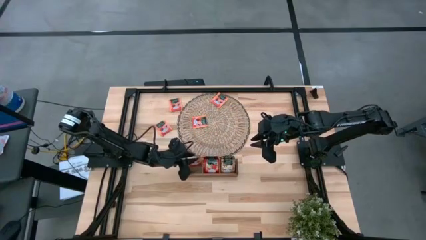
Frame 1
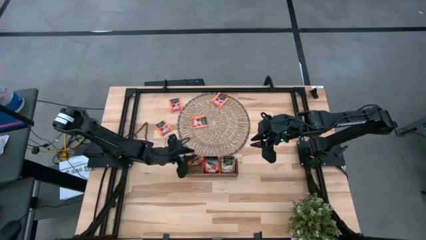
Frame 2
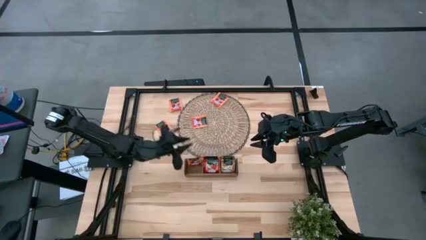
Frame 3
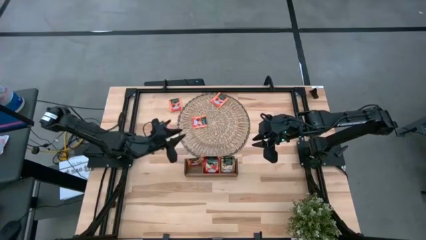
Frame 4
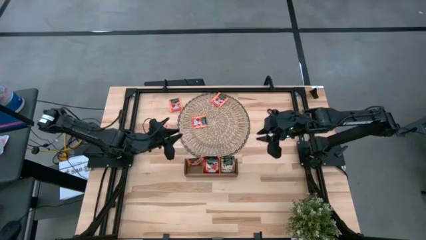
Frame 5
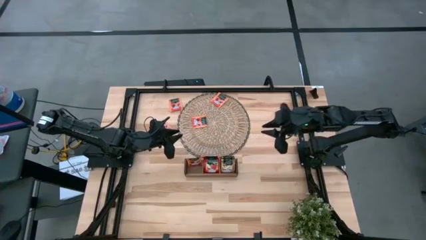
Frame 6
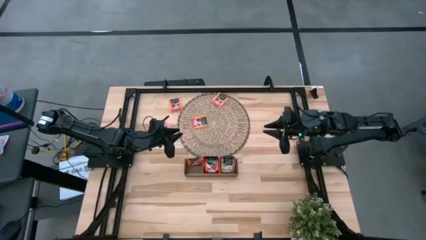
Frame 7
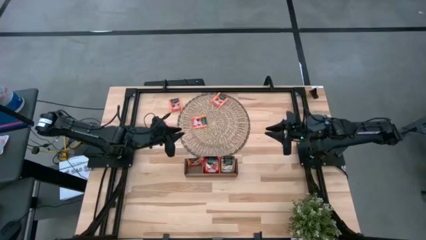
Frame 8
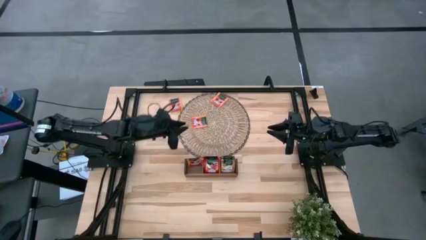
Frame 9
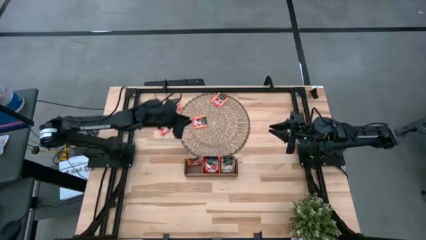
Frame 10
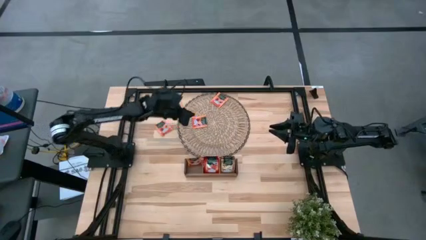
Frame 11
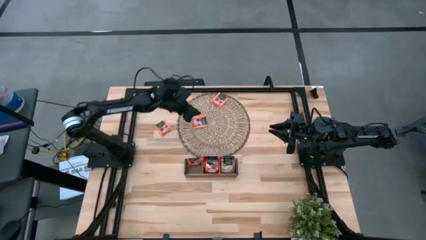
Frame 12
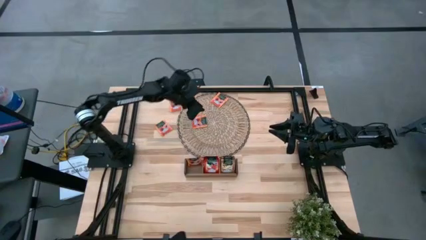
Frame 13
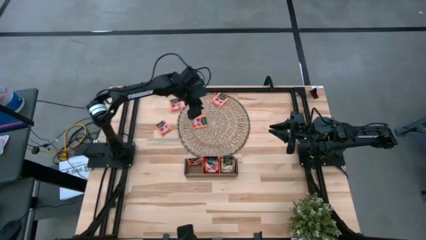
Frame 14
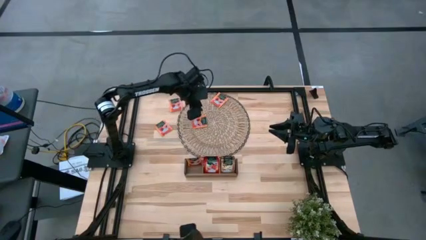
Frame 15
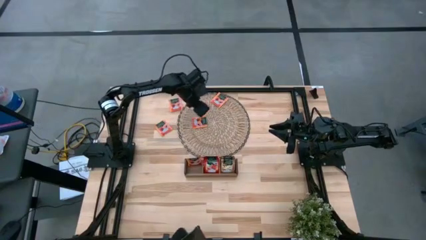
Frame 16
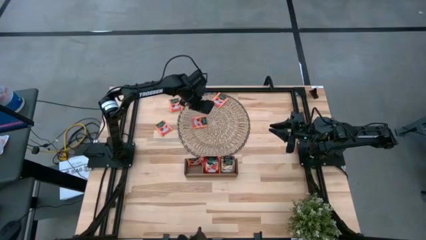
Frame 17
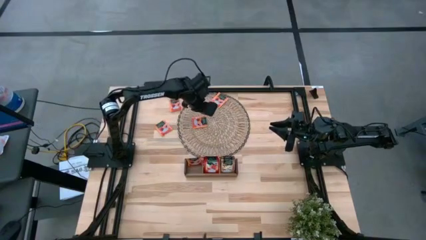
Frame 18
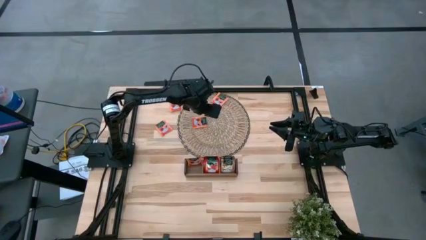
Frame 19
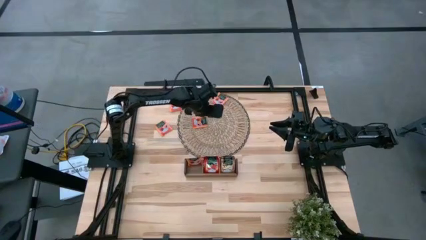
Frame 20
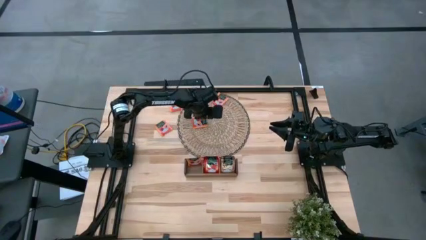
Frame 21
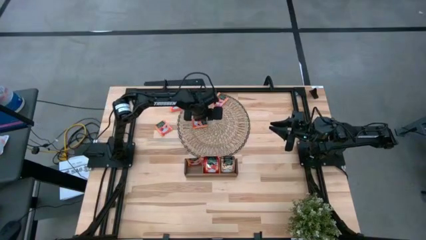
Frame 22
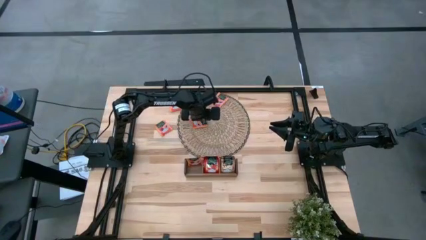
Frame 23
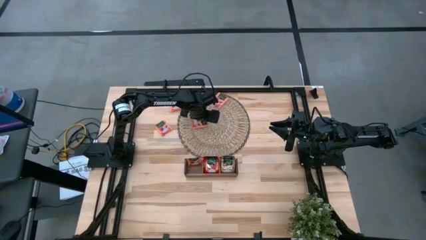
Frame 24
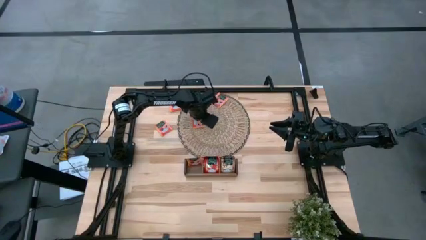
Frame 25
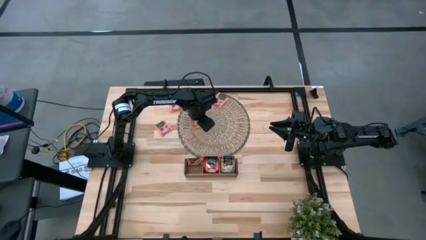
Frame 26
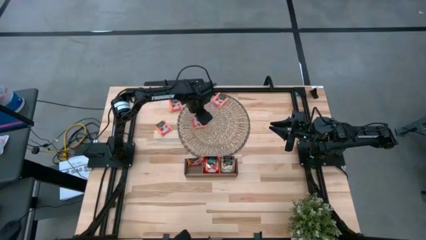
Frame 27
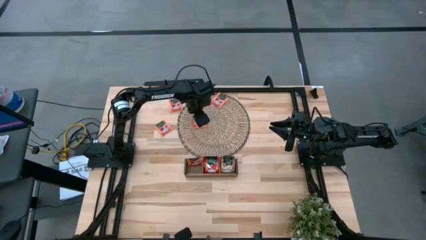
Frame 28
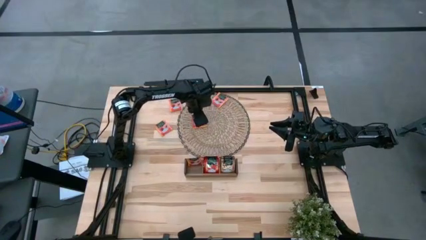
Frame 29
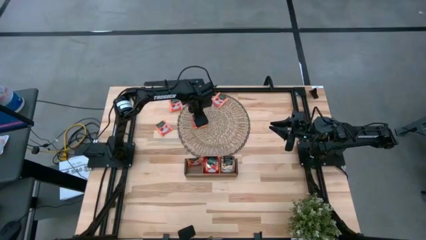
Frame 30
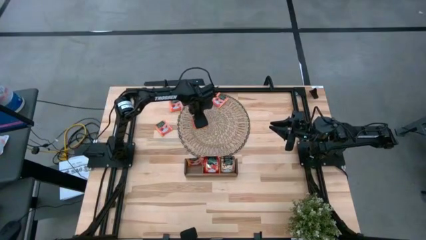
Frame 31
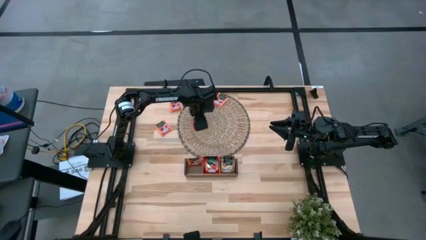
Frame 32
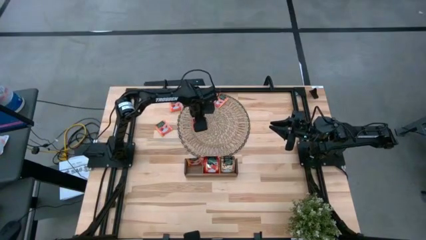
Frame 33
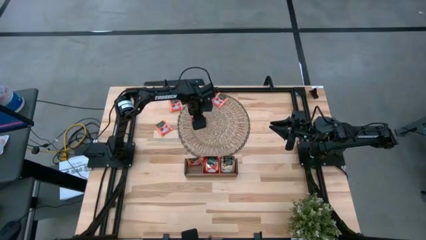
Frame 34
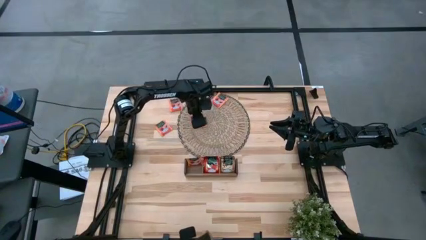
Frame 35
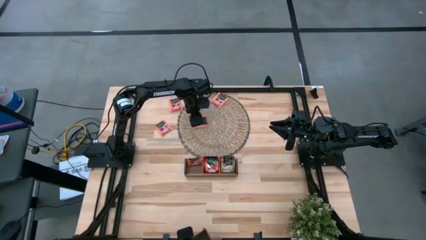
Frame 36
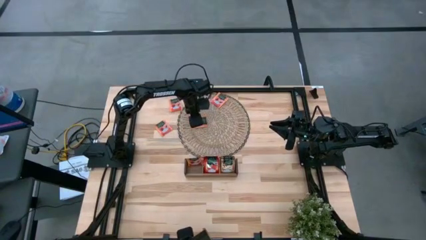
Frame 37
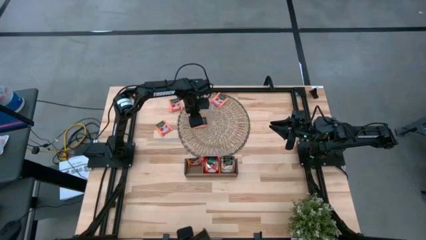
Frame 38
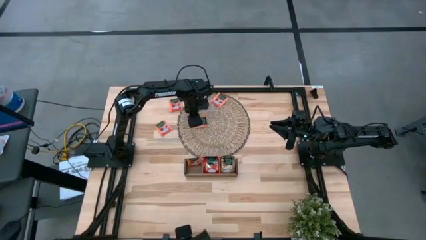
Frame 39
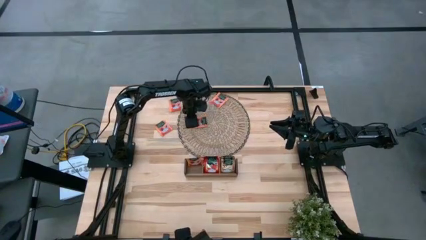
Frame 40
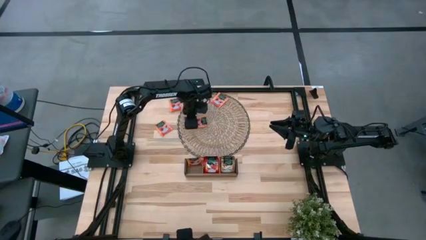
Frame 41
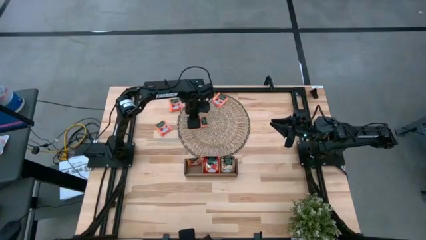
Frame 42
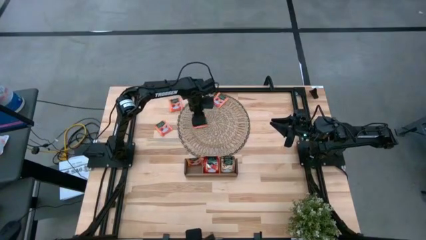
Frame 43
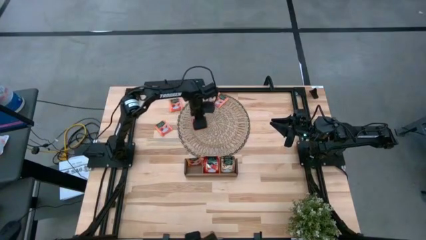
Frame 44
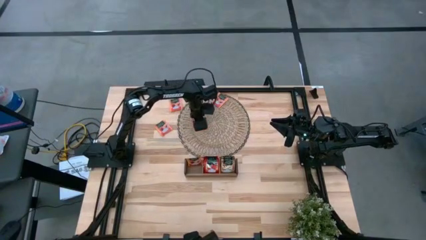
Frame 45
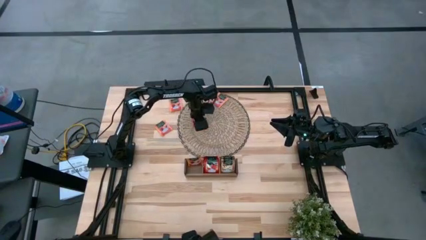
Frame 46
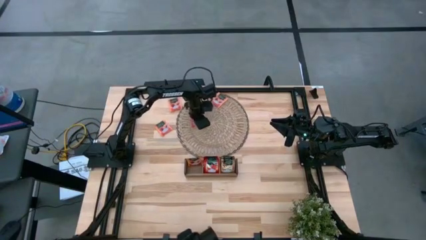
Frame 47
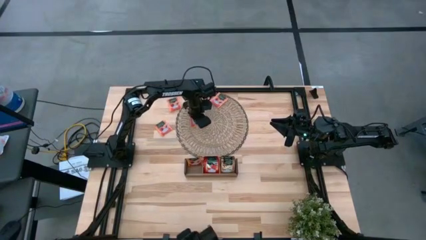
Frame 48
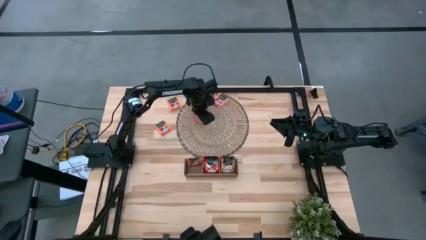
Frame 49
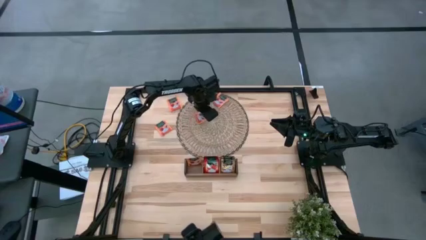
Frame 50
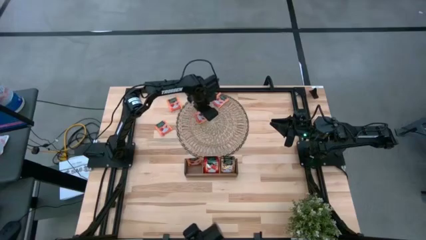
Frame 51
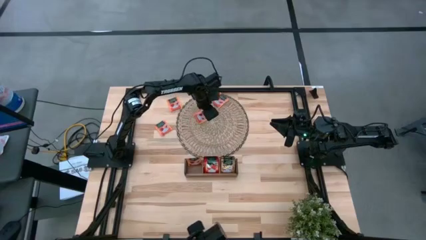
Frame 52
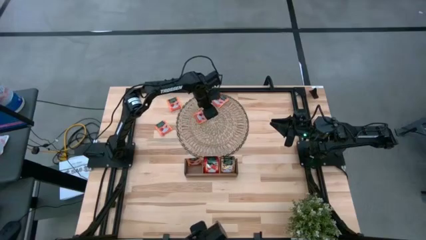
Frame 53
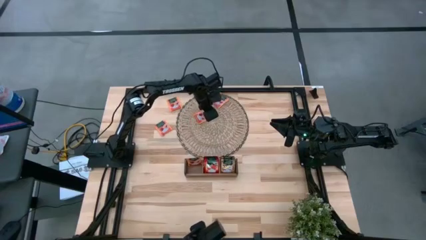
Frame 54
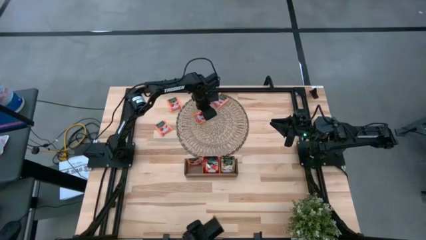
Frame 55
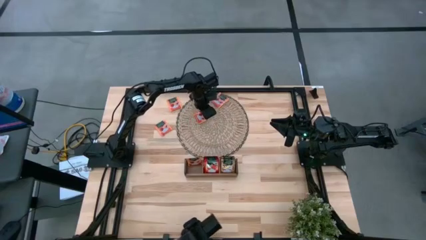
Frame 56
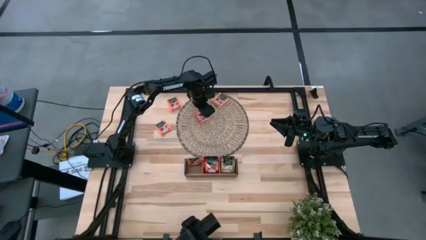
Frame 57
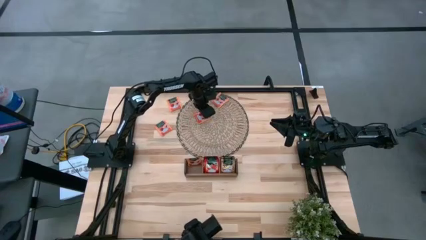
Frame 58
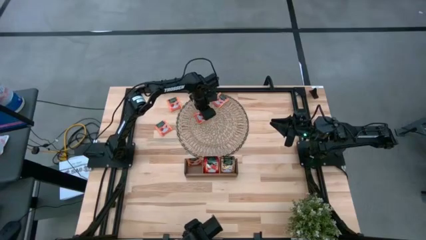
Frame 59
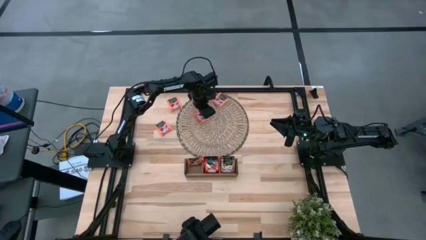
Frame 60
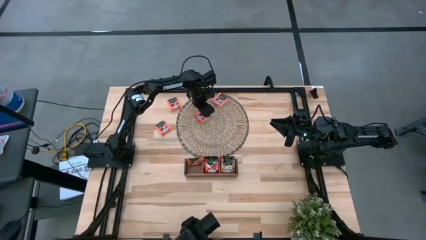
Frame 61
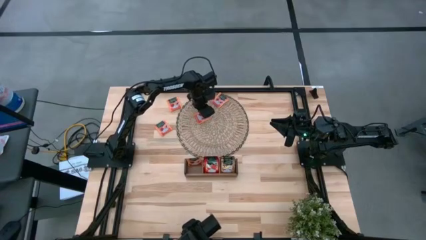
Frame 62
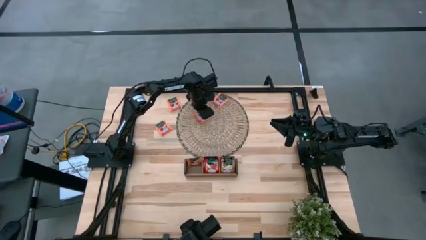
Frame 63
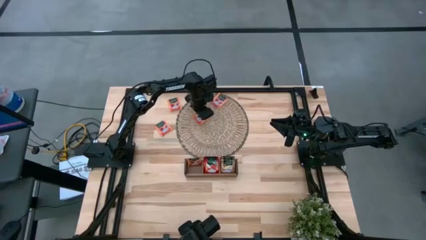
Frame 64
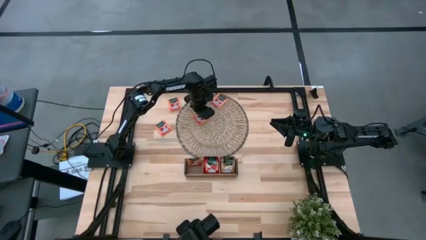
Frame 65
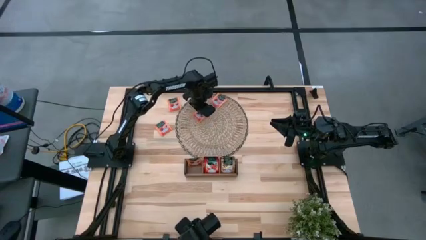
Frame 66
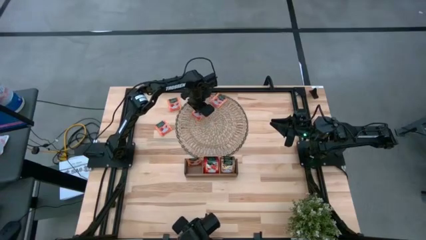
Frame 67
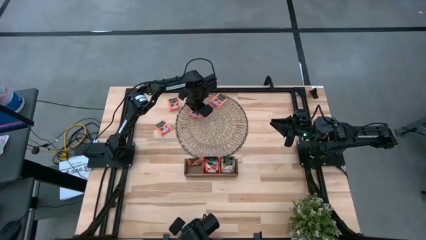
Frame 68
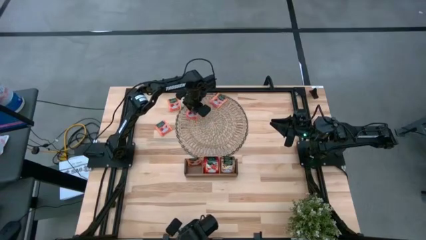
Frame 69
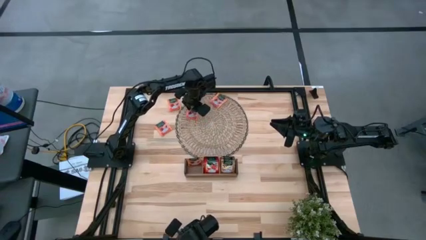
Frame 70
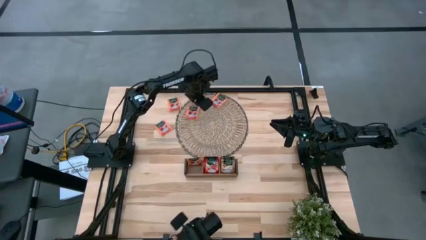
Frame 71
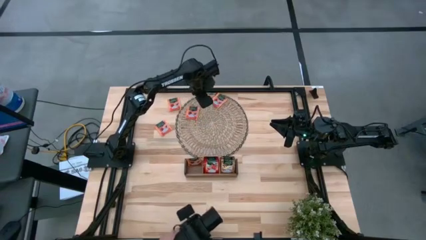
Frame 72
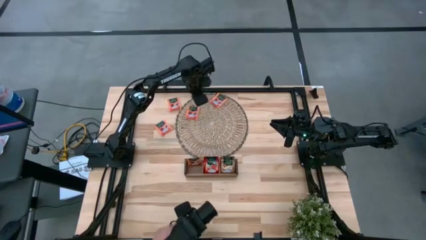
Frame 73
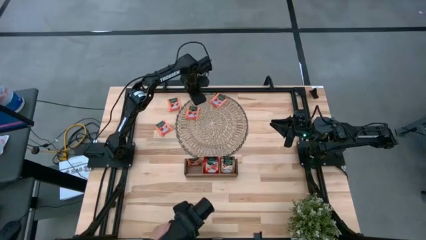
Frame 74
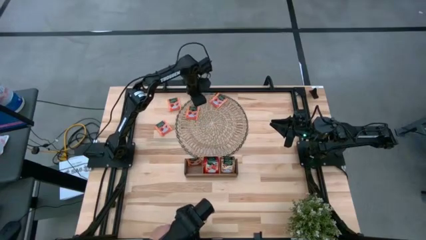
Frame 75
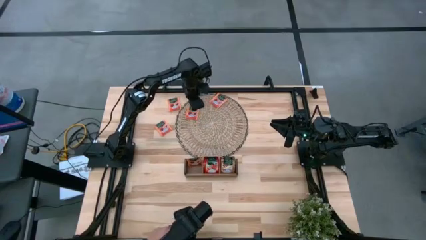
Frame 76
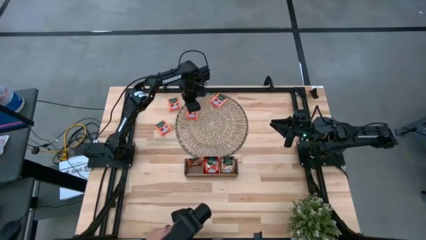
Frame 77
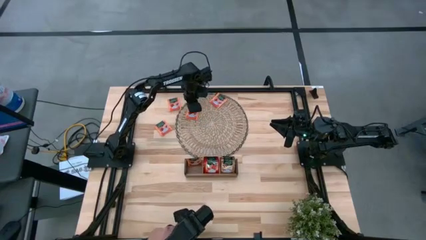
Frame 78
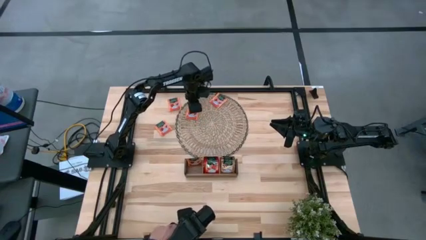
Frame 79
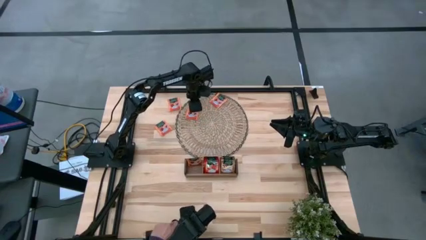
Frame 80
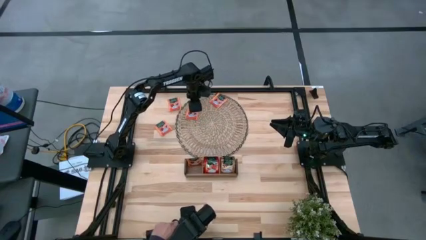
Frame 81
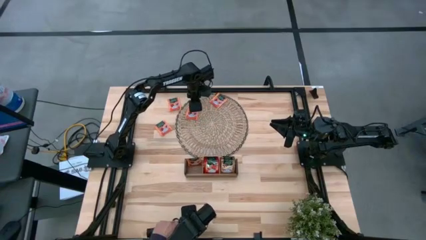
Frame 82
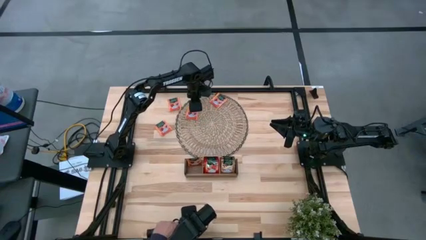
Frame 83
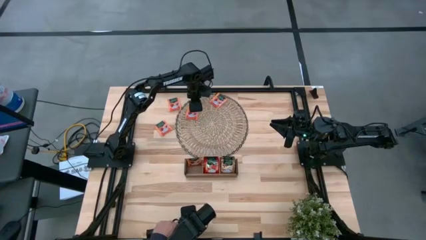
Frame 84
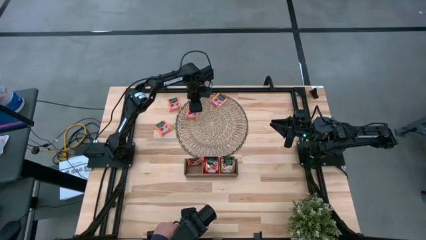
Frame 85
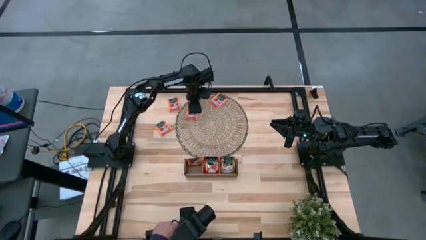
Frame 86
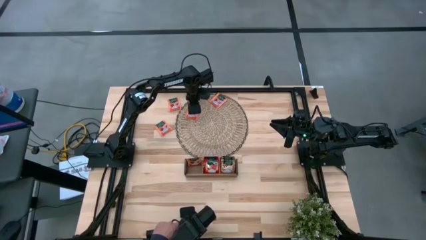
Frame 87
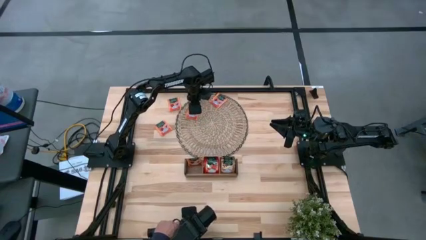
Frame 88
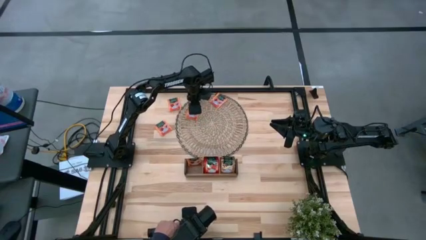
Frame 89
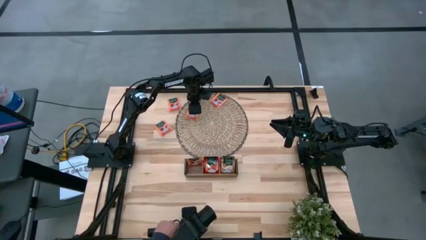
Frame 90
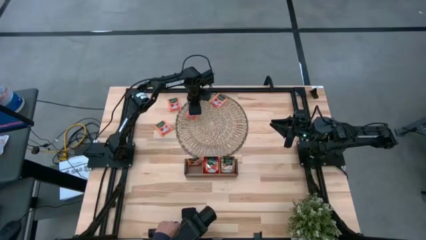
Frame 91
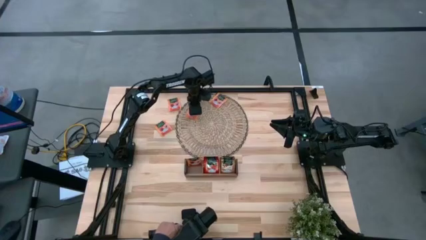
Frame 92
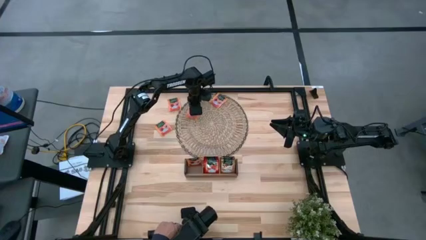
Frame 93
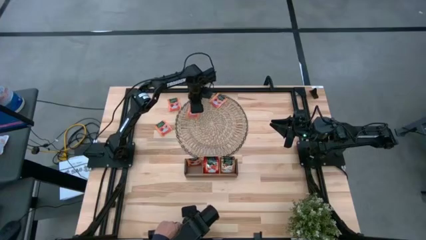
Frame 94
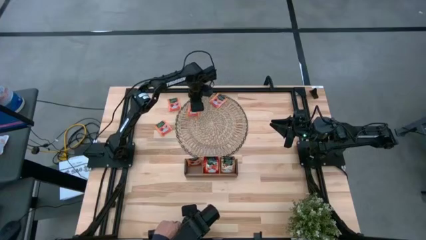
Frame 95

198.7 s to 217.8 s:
Task: Pick & Place Tea
Put the orange tea bag into the left section of the wooden organizer
